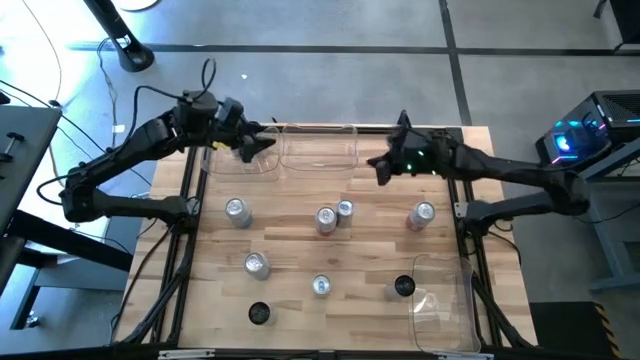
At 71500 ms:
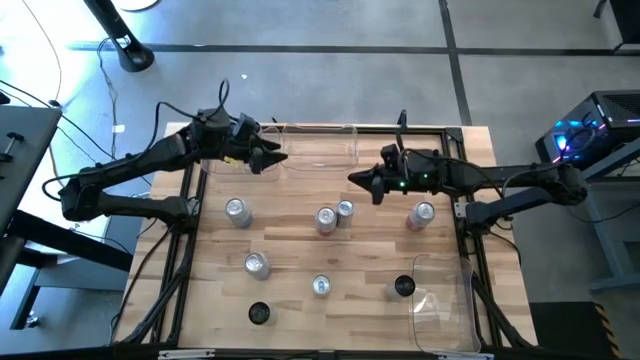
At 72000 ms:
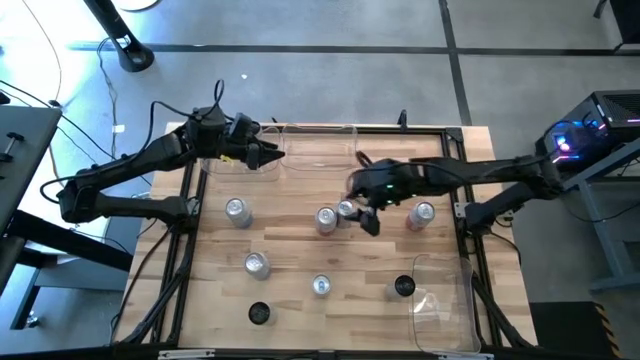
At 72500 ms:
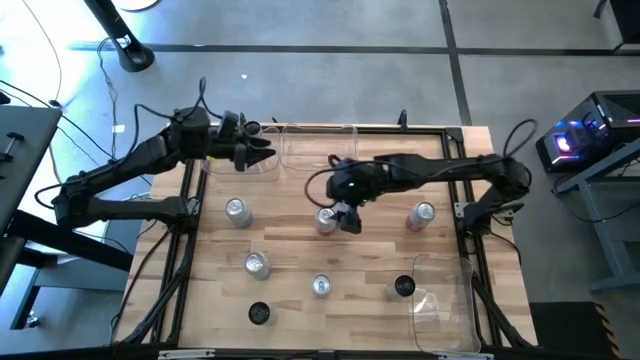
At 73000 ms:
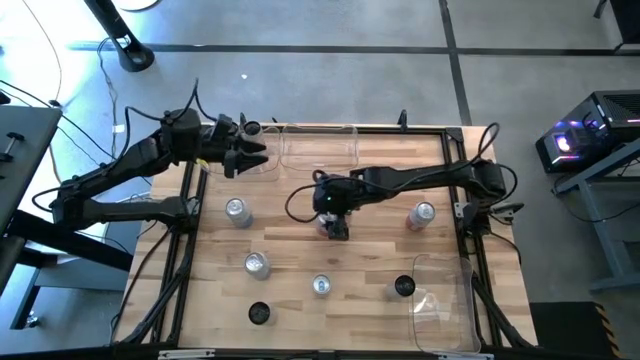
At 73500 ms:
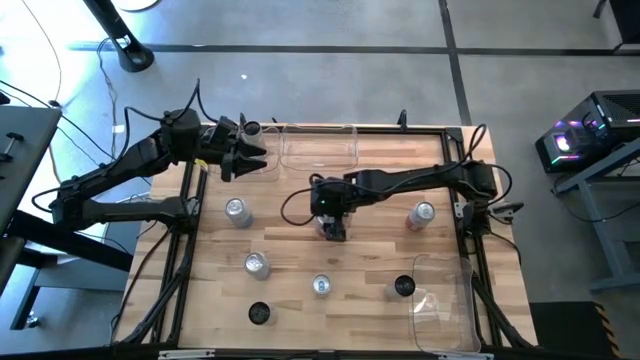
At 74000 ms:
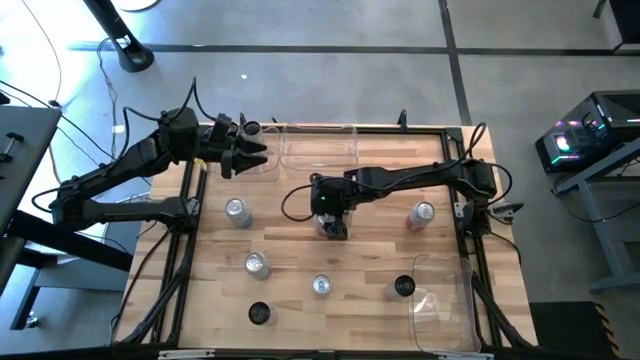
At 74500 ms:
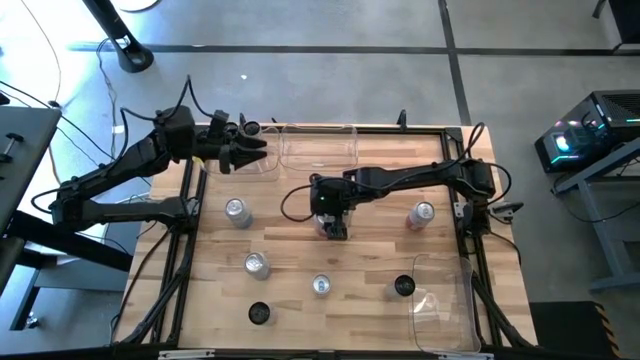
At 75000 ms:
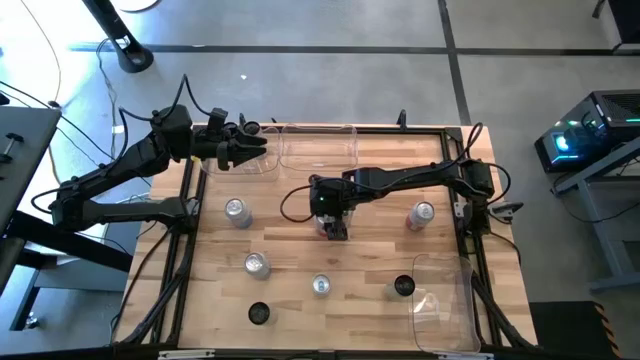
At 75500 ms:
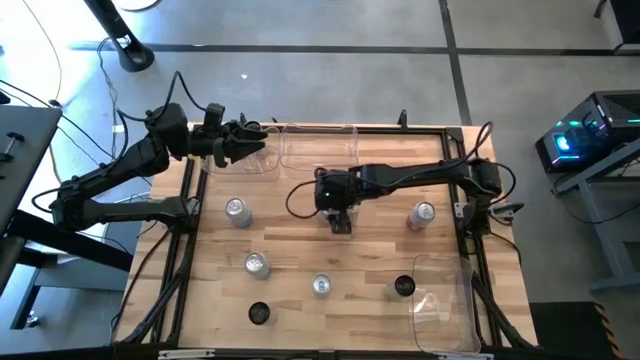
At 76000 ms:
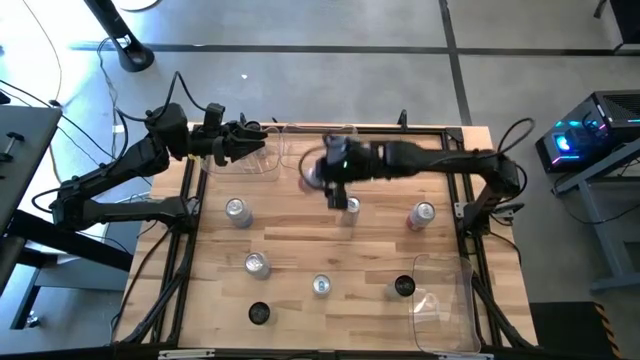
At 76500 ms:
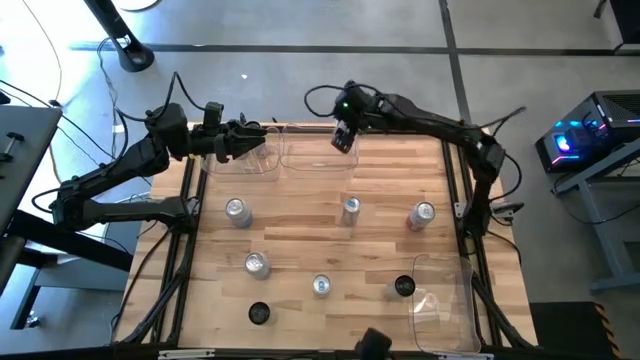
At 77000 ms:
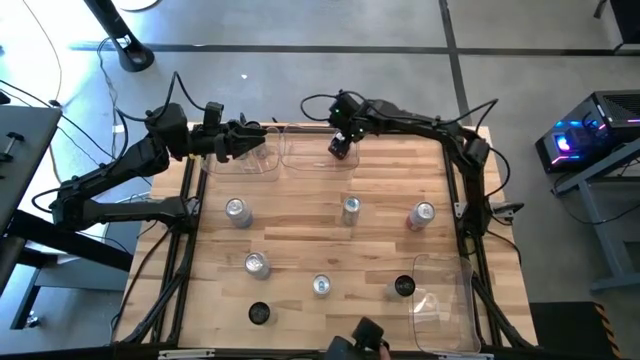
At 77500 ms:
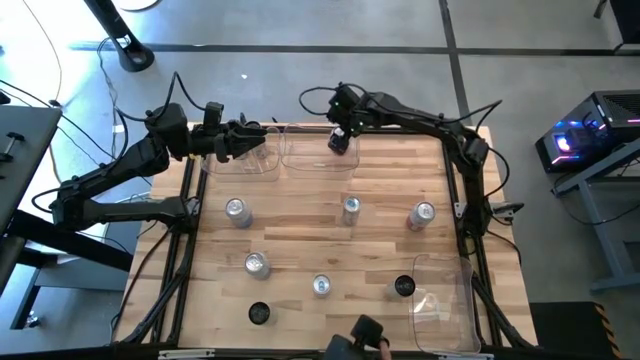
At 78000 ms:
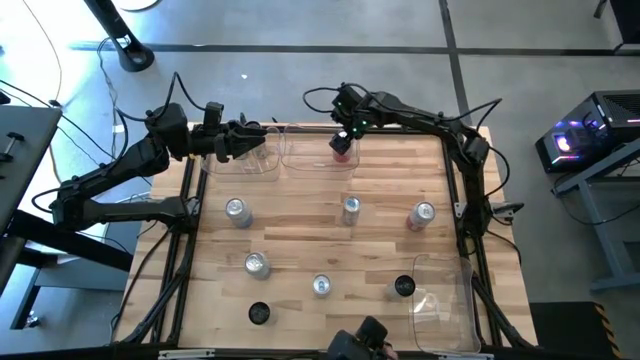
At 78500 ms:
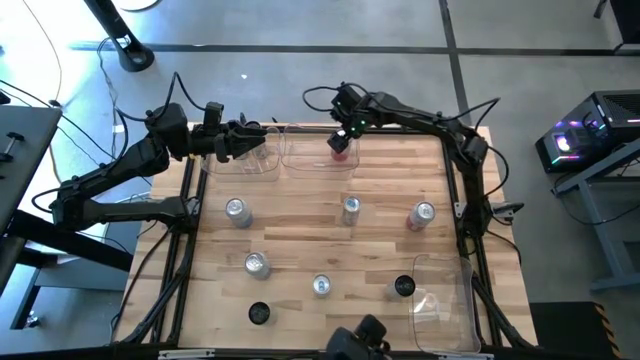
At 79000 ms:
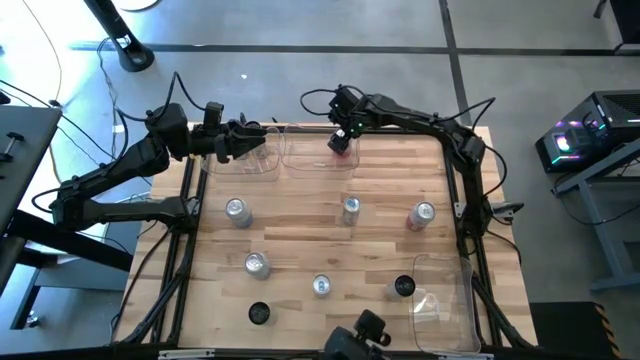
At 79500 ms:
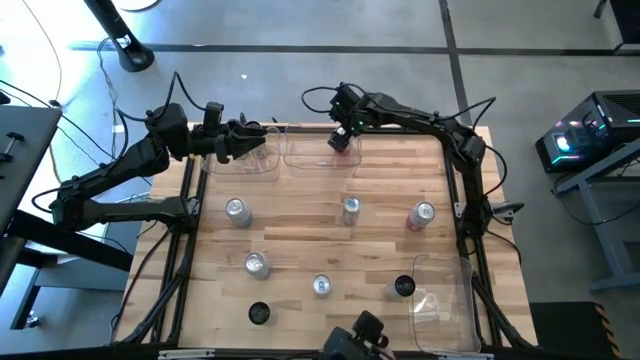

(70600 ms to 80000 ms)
Task: Sort soda cans
Put the left pink-white soda can into the top right transparent bin

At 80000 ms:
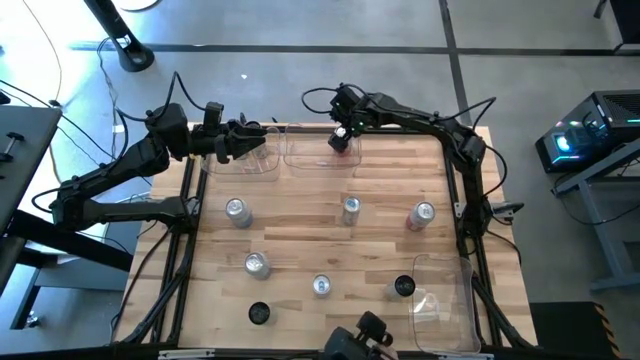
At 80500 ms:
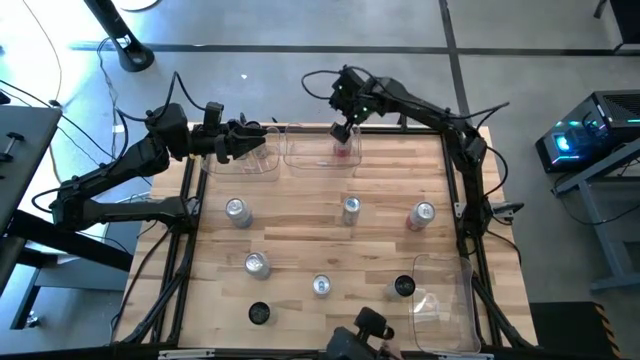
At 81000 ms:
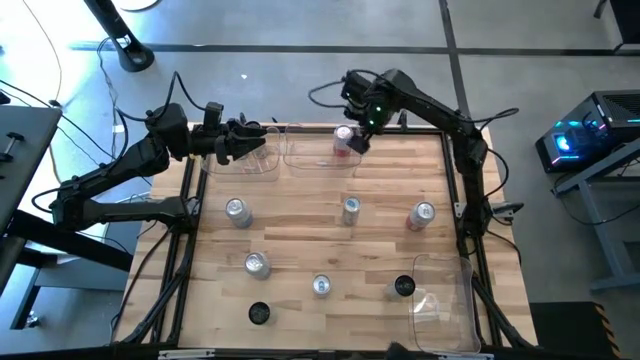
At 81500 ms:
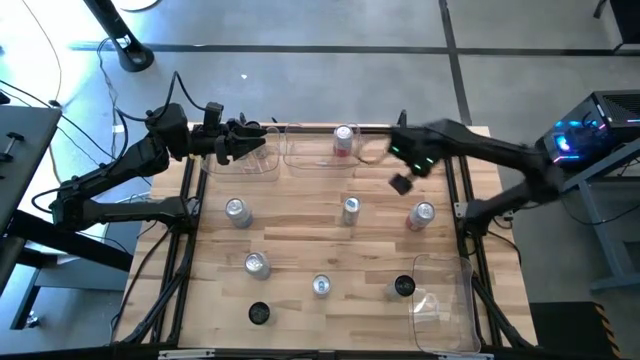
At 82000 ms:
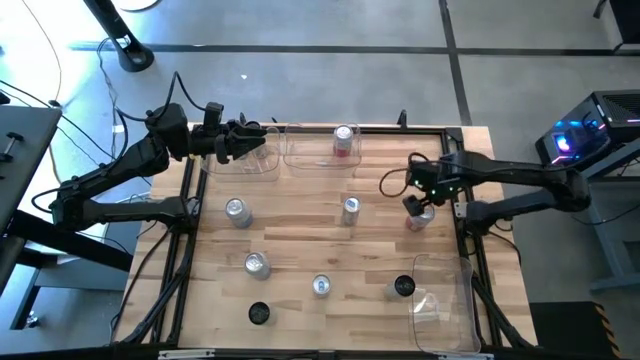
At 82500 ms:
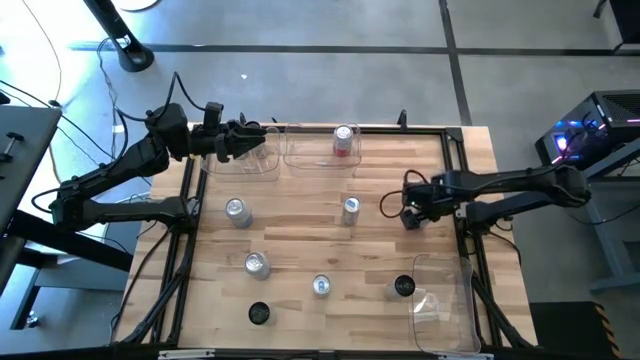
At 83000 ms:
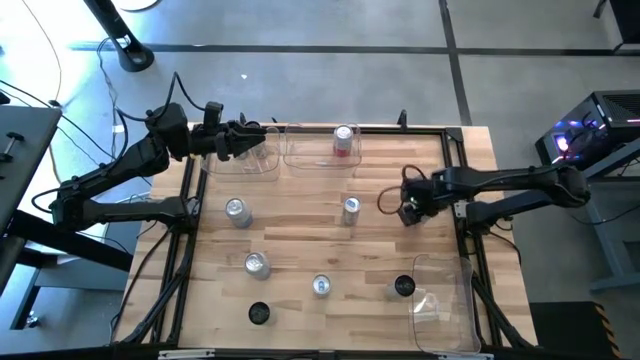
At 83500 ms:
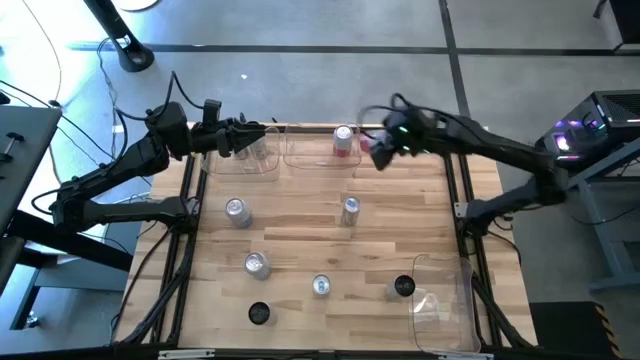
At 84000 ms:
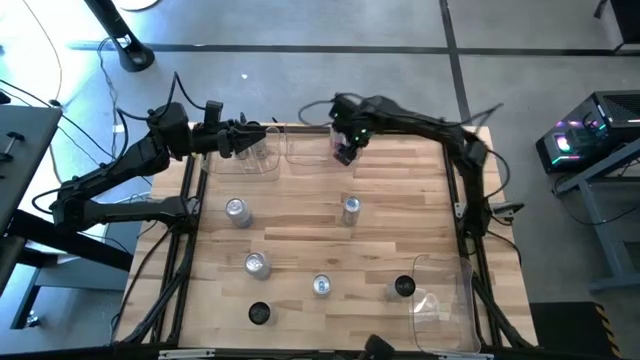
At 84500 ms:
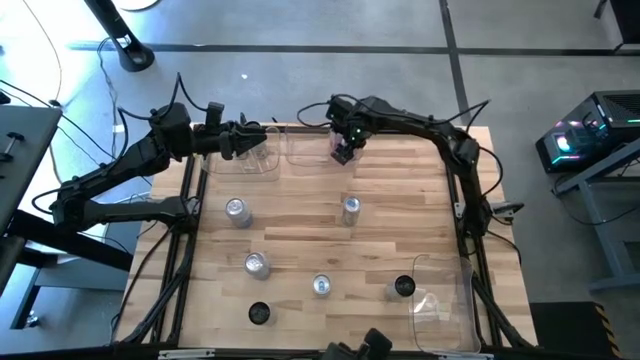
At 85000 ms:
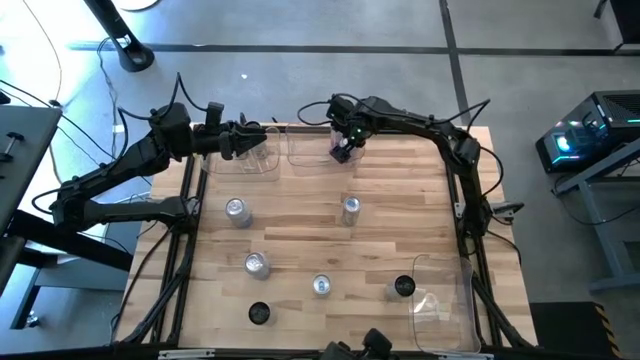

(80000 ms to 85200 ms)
Put the pink-white soda can into the top right transparent bin

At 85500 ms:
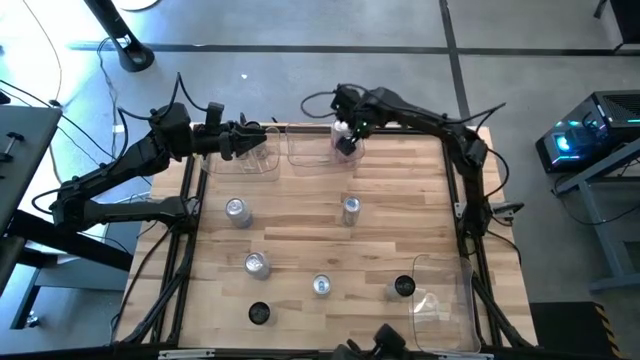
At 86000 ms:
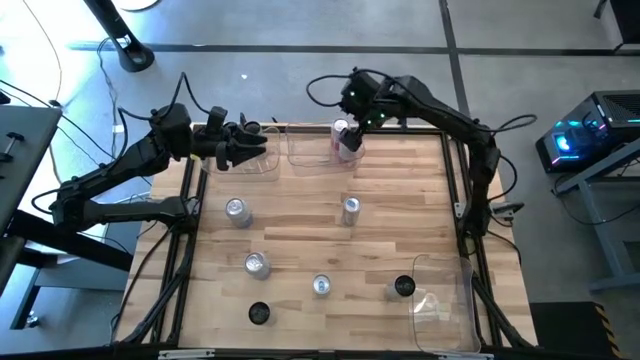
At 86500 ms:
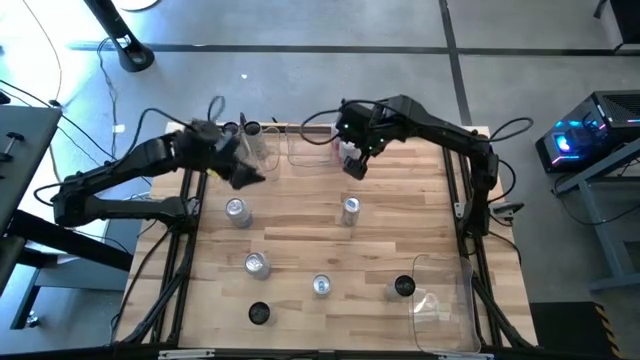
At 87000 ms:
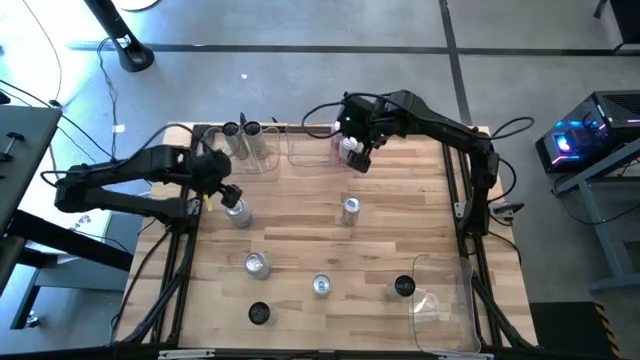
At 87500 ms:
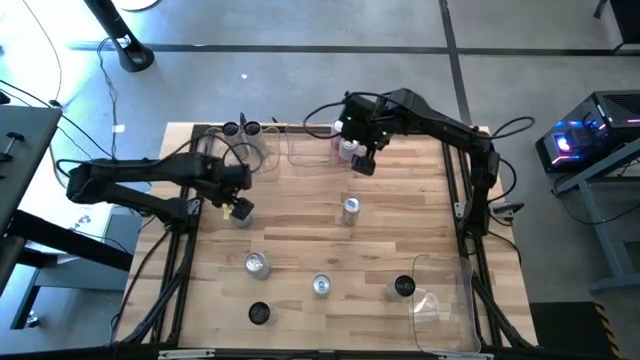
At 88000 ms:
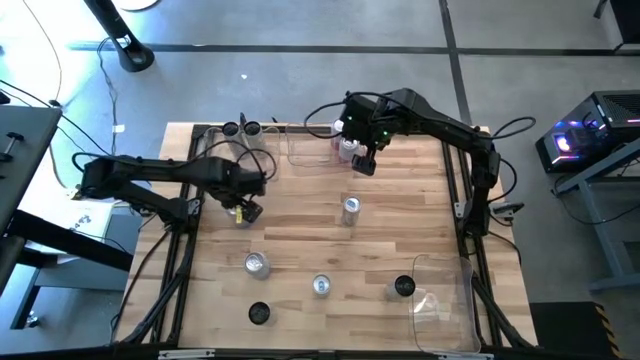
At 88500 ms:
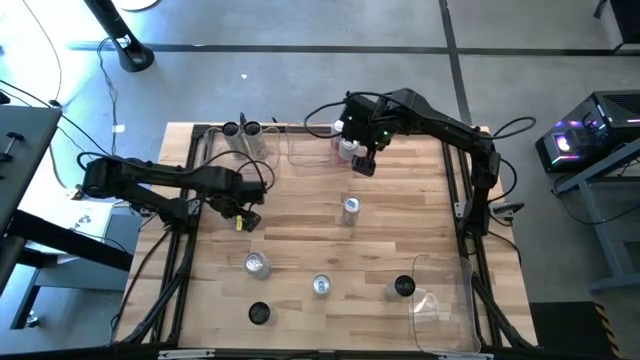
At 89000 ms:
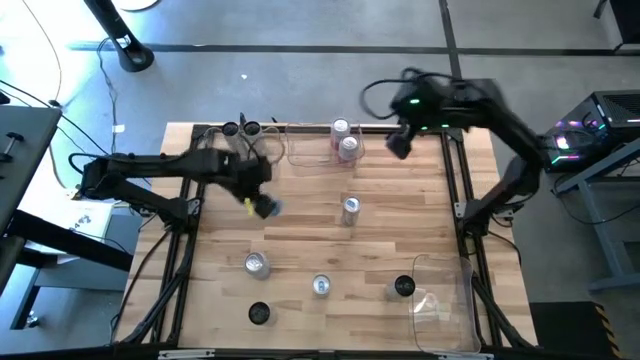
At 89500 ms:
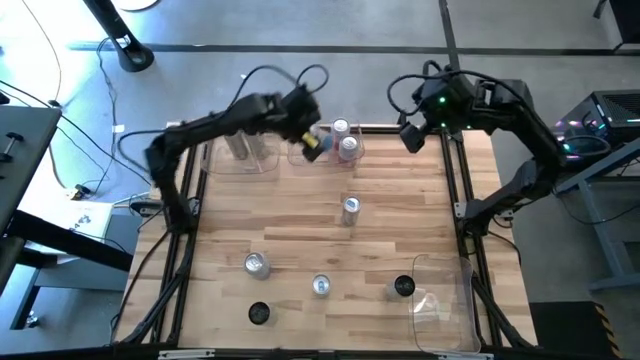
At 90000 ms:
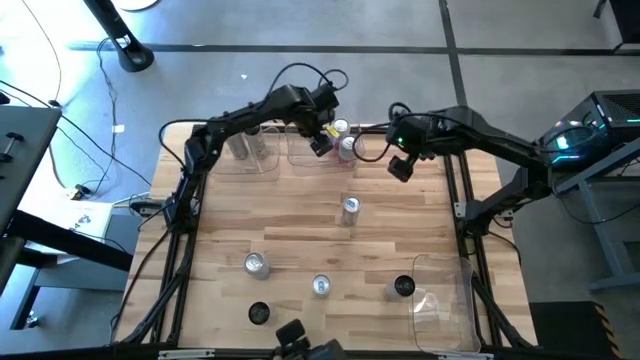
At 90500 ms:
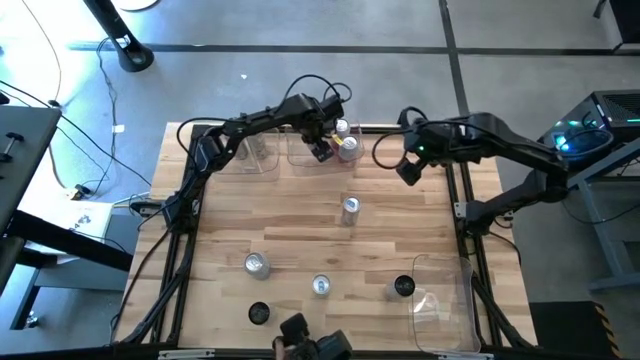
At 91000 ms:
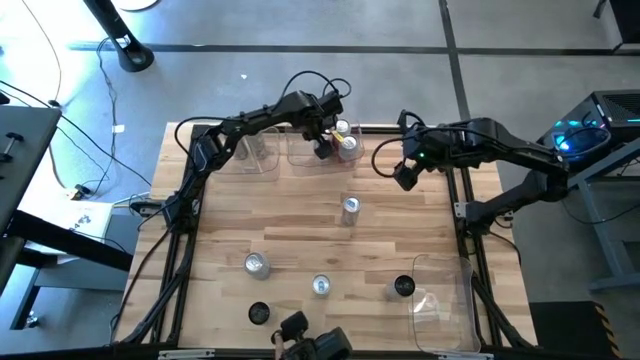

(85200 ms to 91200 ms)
Put the top blue-white soda can into the top right transparent bin
